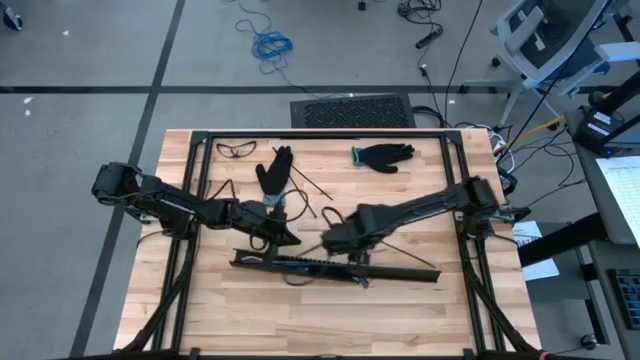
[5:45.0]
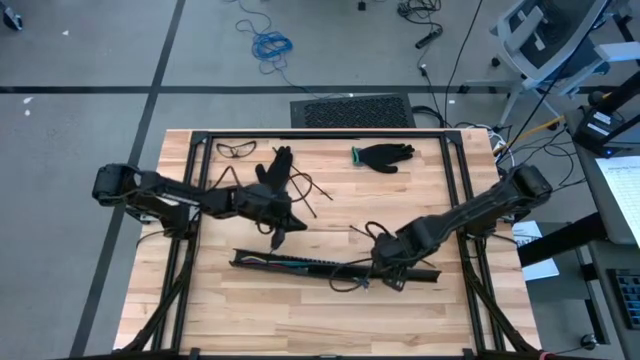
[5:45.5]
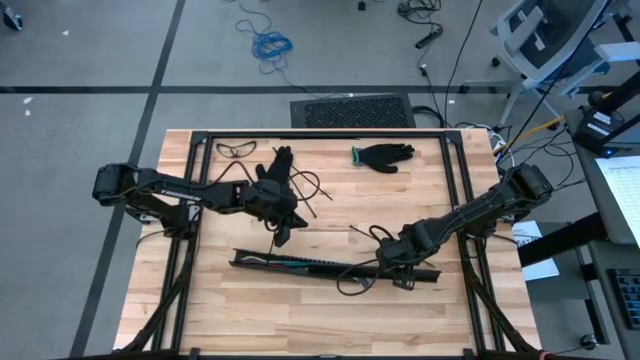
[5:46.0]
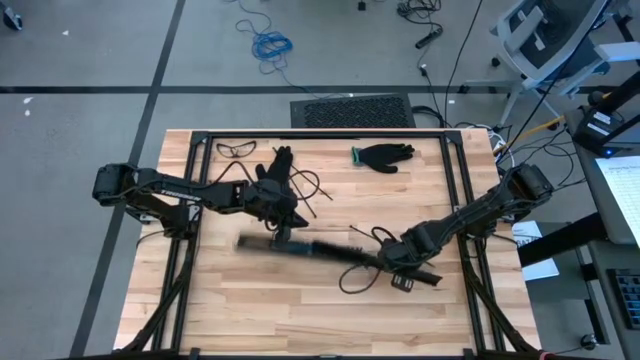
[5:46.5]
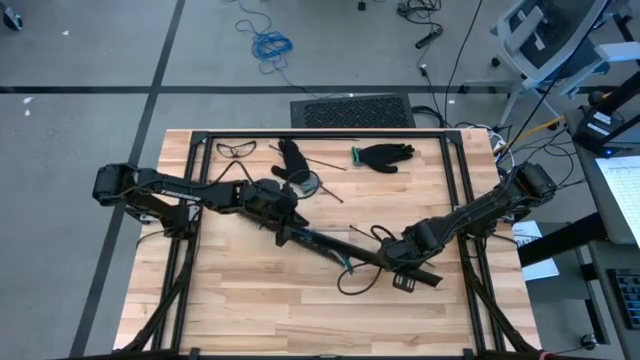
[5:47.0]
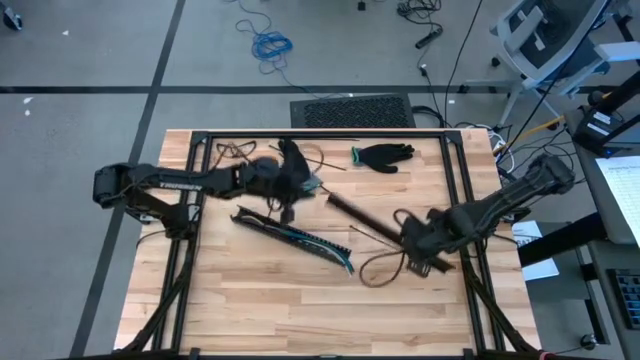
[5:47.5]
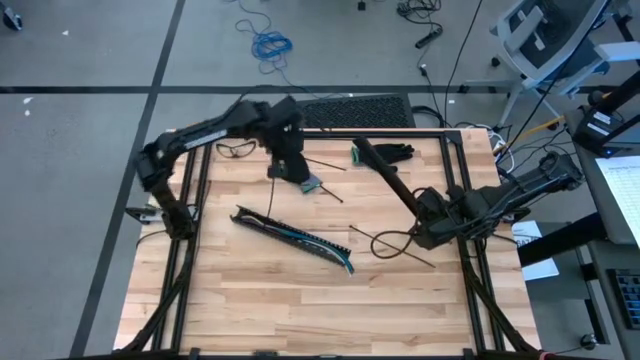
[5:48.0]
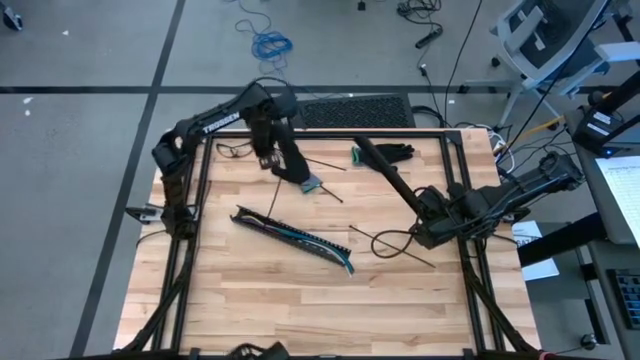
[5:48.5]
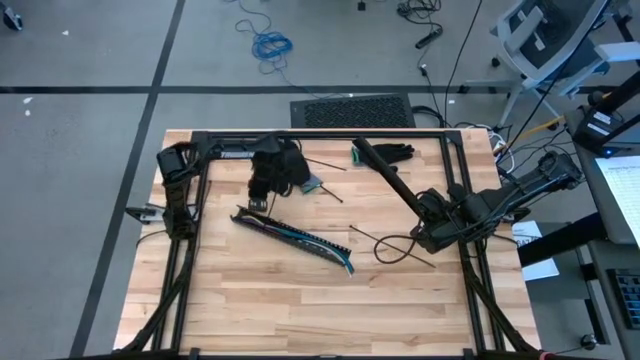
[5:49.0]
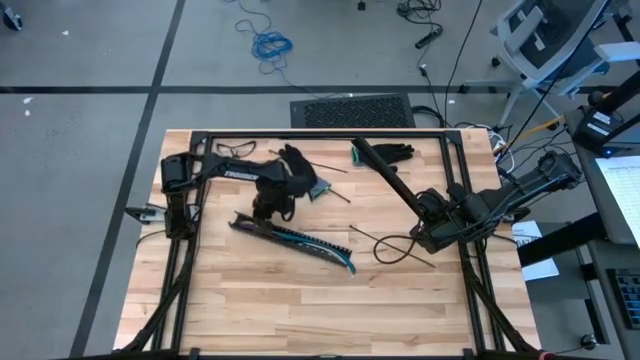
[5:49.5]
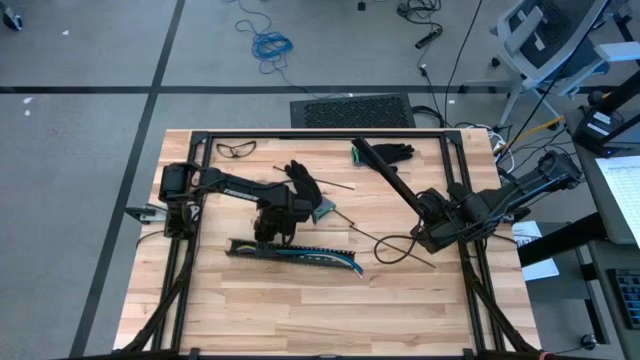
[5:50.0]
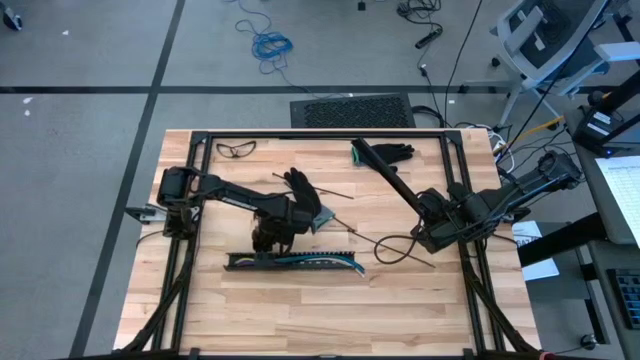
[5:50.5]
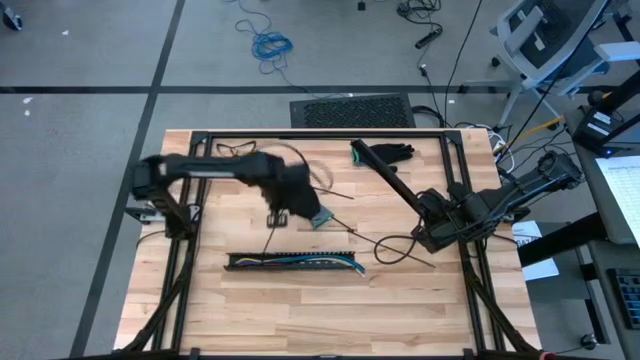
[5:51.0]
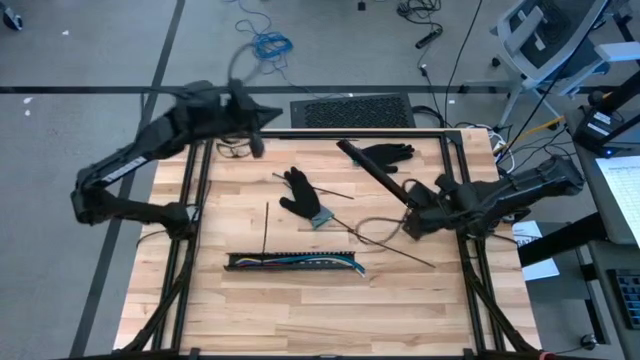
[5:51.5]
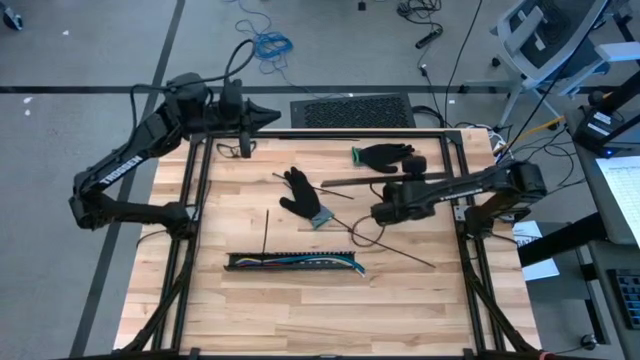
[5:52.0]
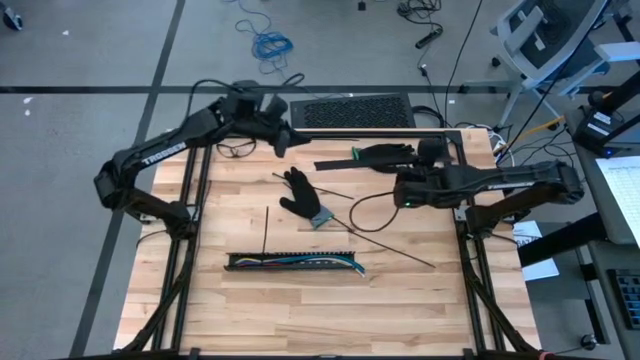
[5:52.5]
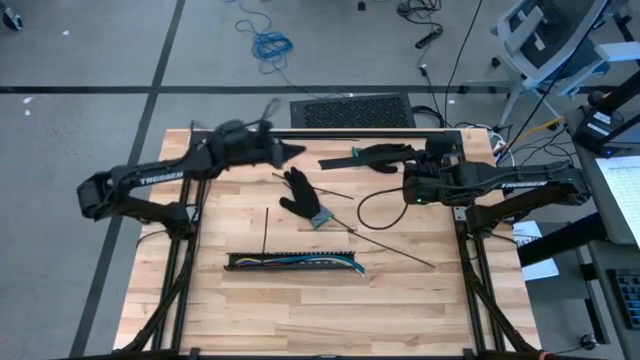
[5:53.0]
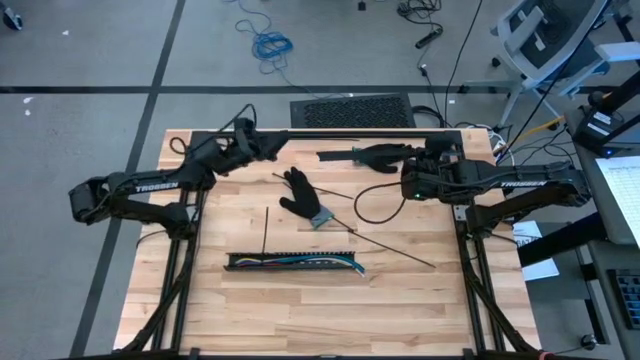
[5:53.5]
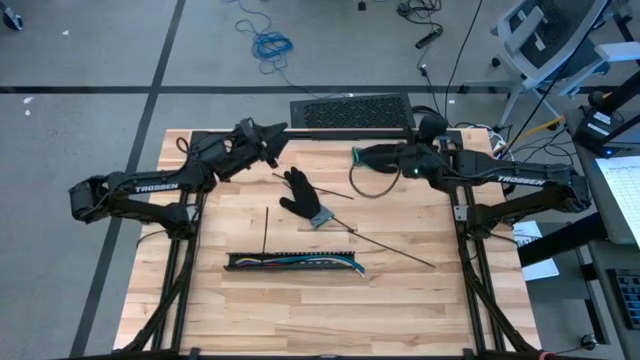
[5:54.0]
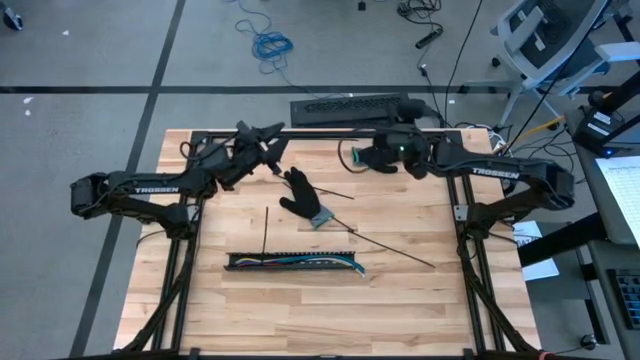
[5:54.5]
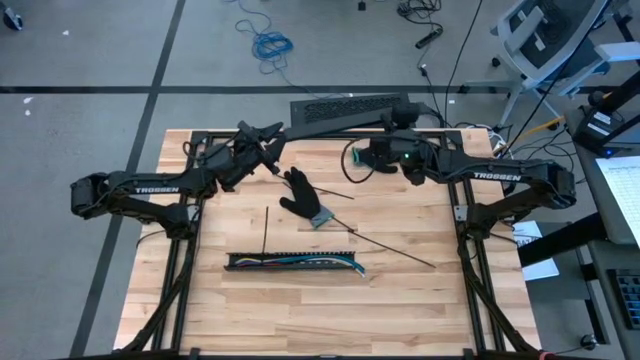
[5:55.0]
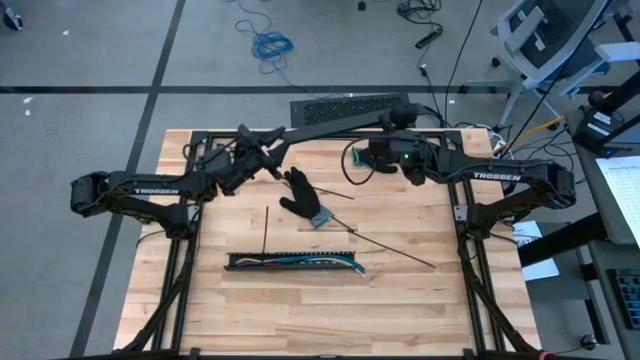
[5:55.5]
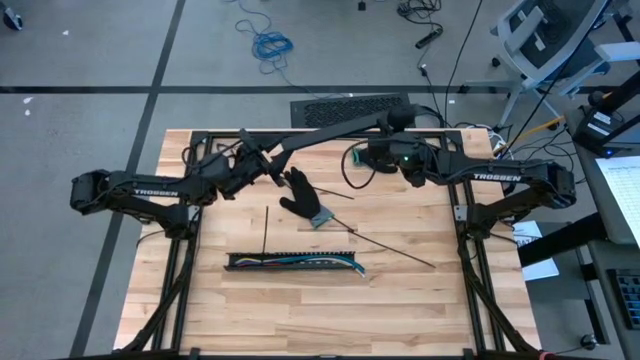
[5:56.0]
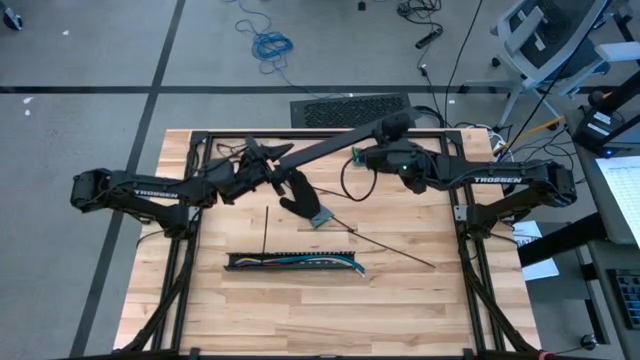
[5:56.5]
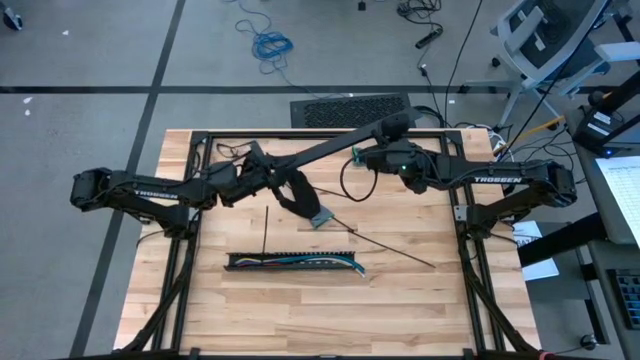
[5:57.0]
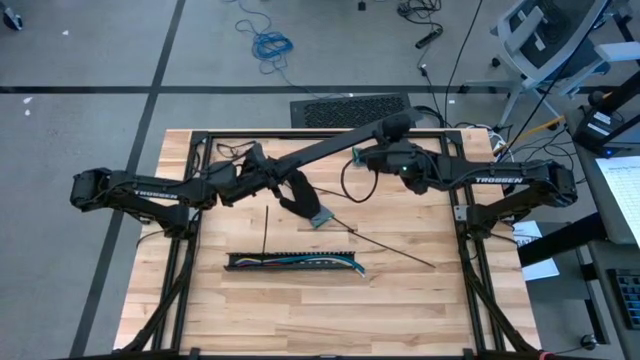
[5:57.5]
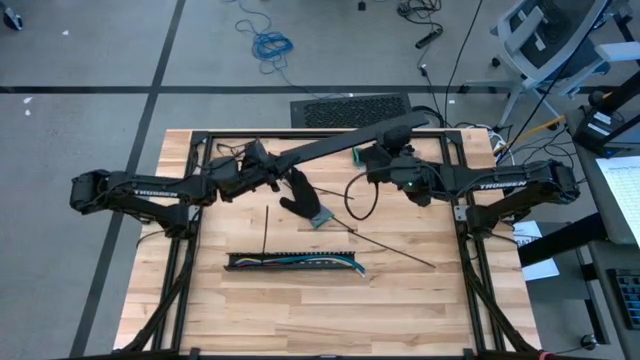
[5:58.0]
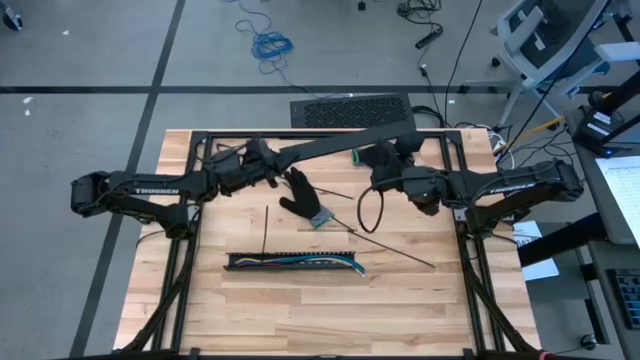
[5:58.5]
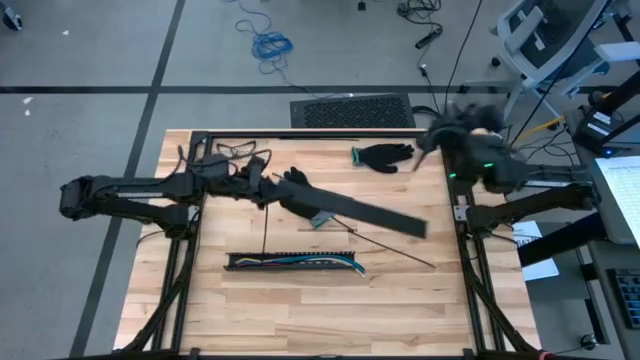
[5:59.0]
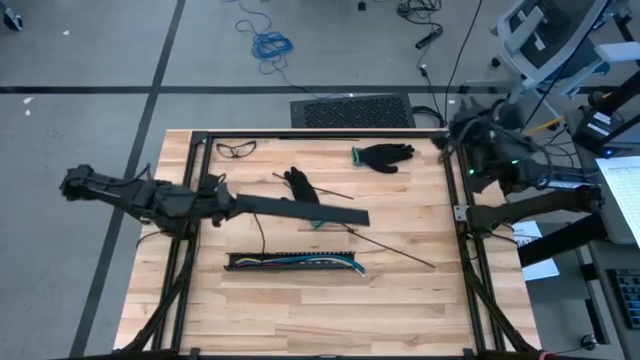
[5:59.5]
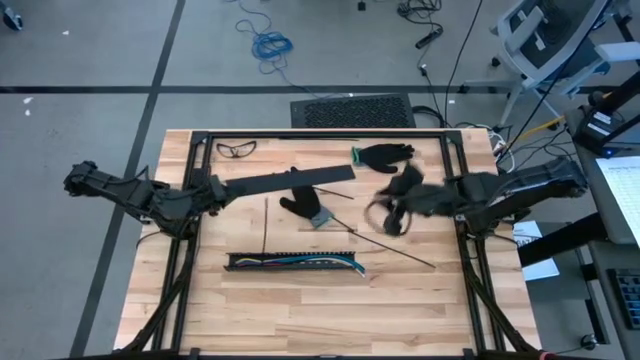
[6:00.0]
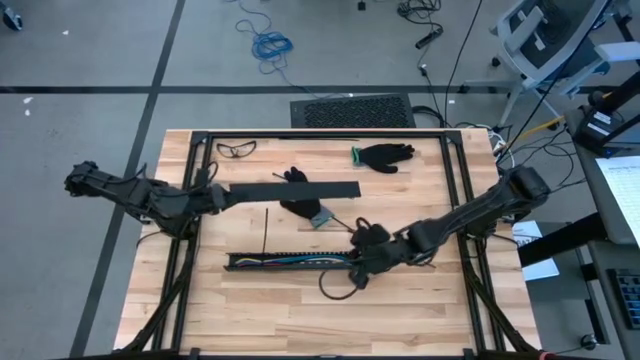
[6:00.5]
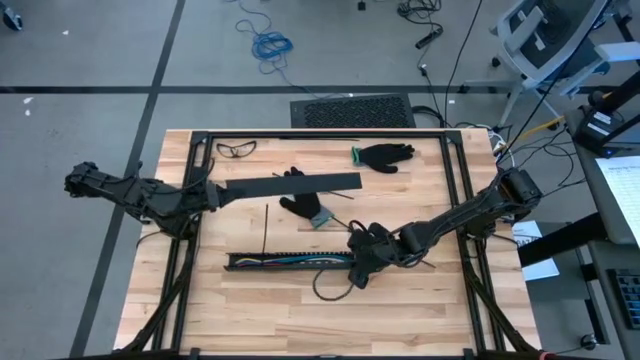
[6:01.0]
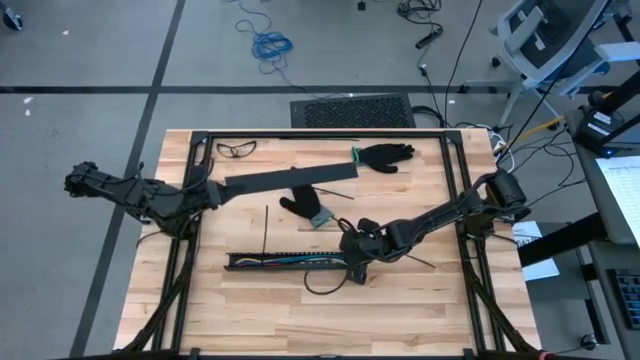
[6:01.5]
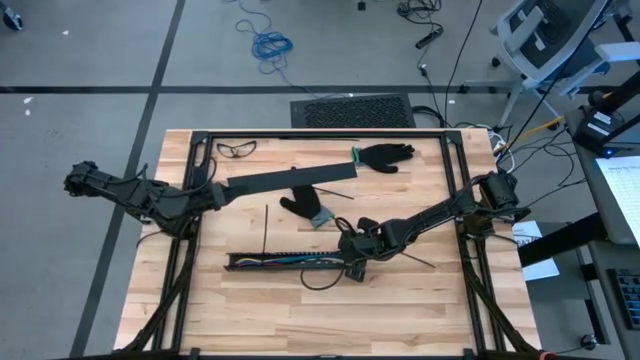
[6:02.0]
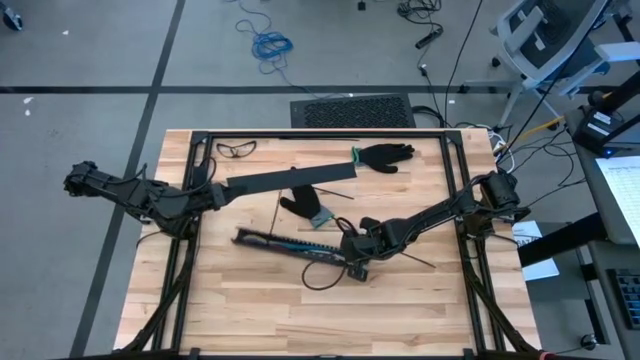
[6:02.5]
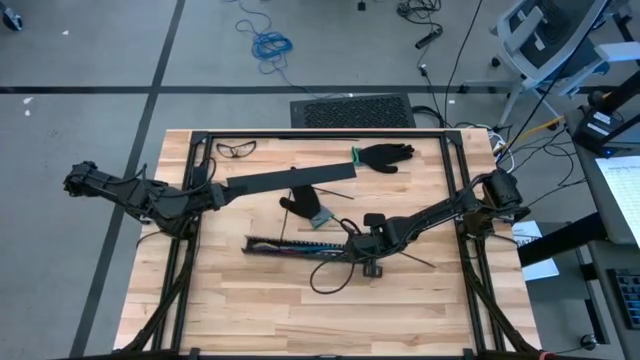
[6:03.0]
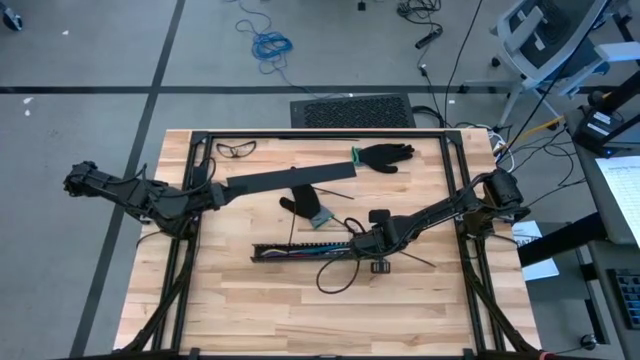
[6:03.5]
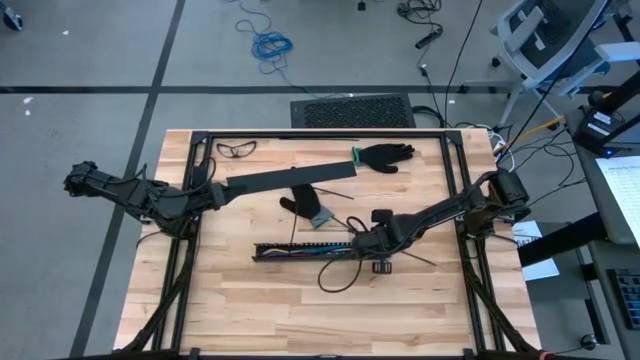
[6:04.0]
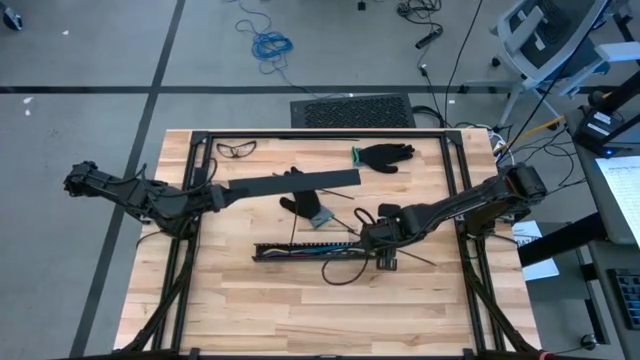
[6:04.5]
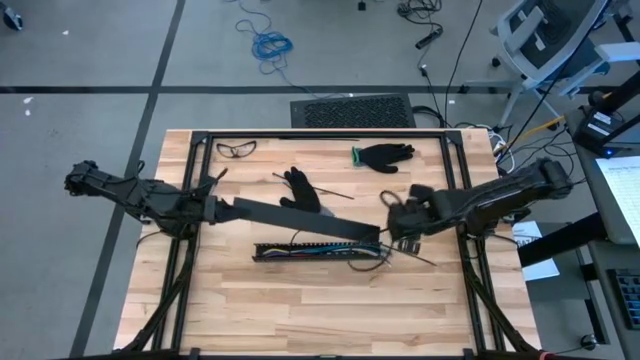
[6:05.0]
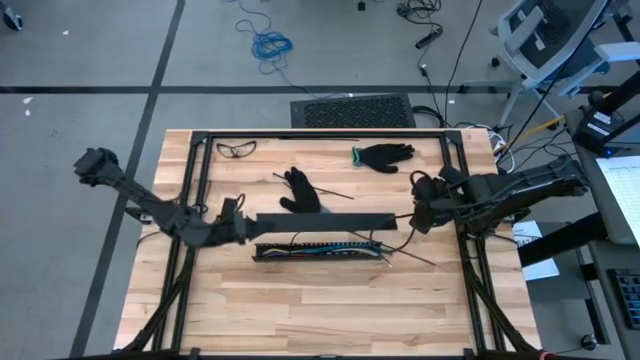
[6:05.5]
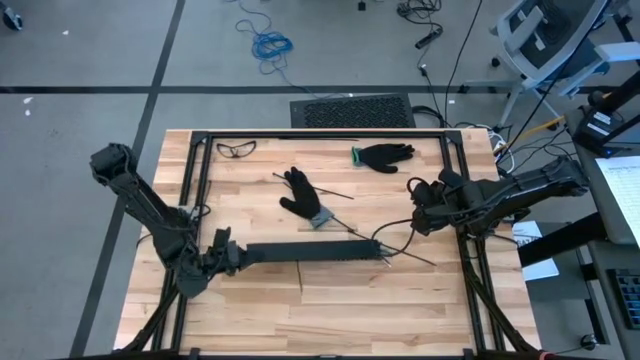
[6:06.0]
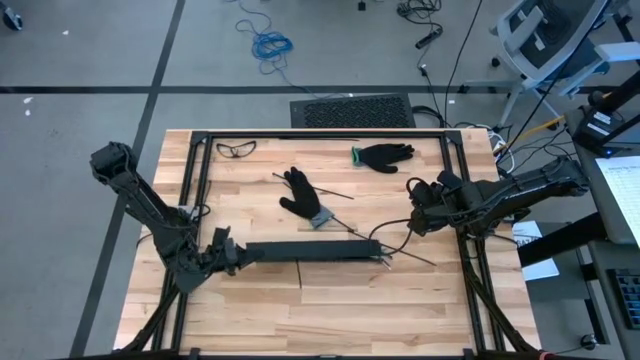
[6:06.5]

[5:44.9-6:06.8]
Task: Ziptie cables
Insert the black cover of the black cable duct
